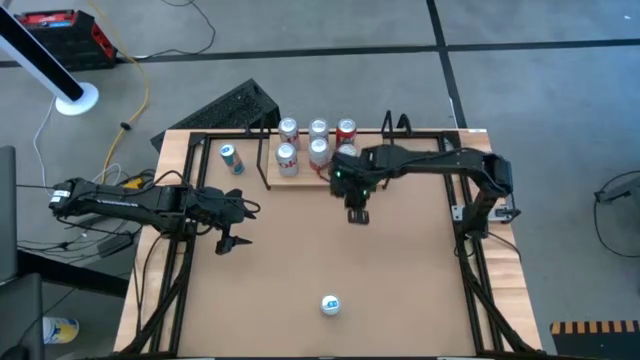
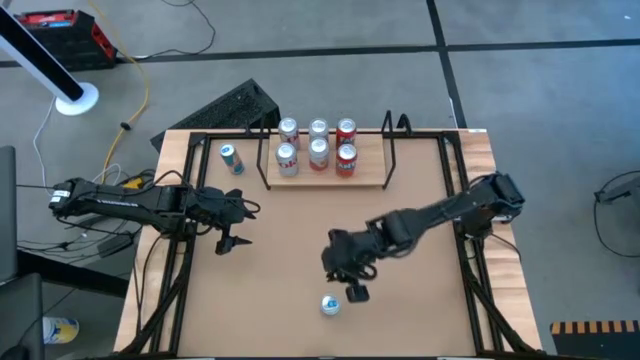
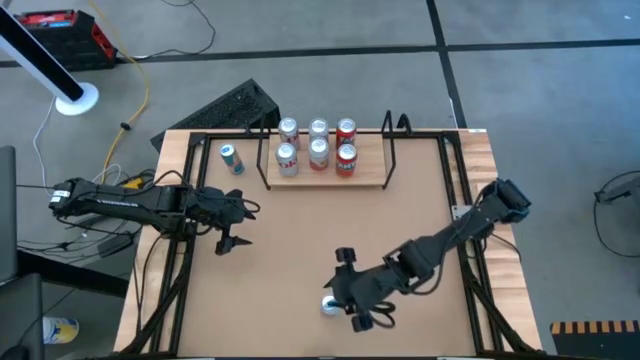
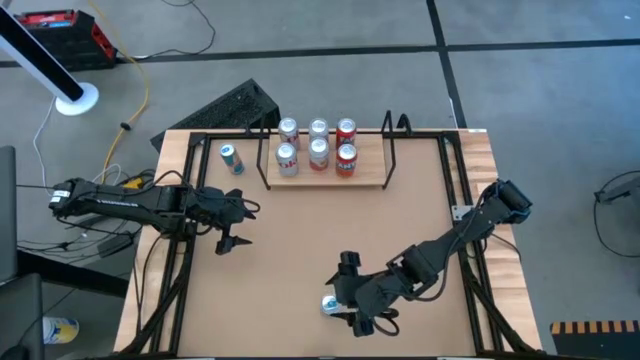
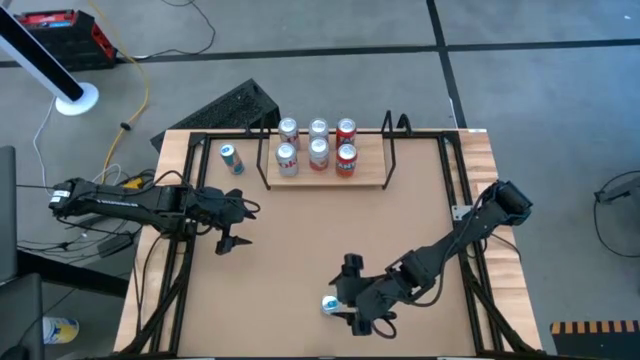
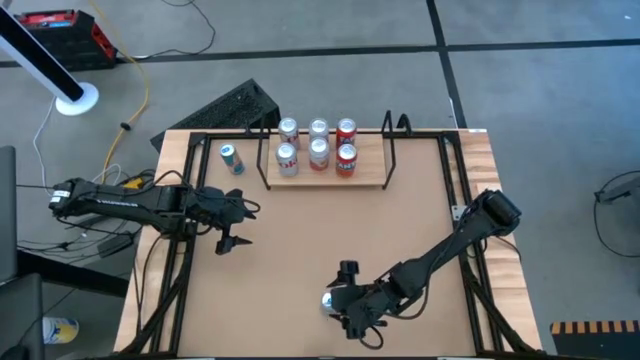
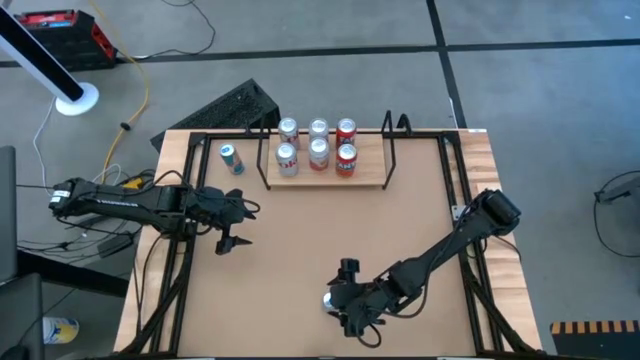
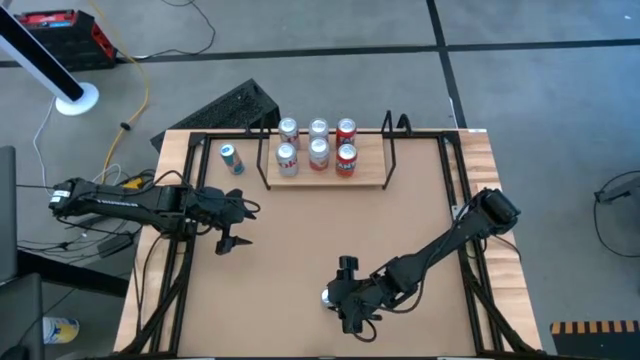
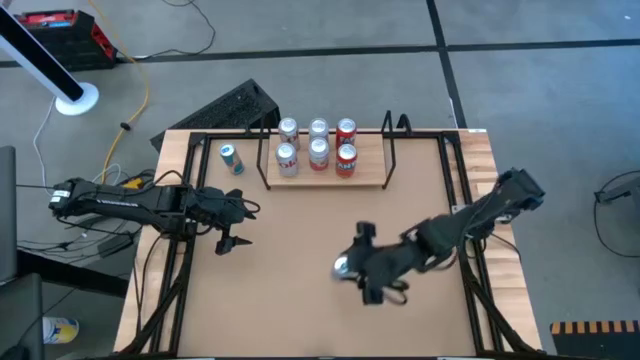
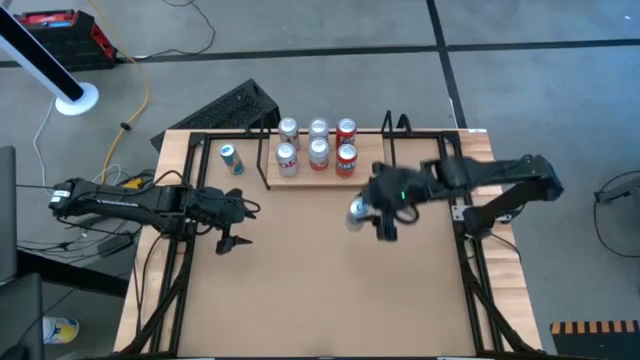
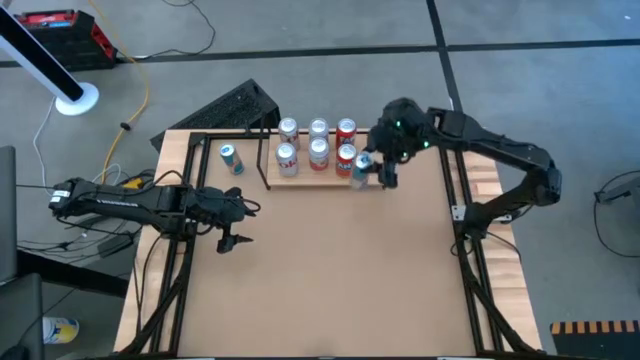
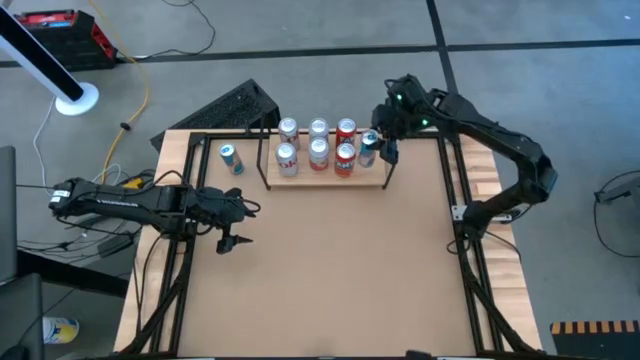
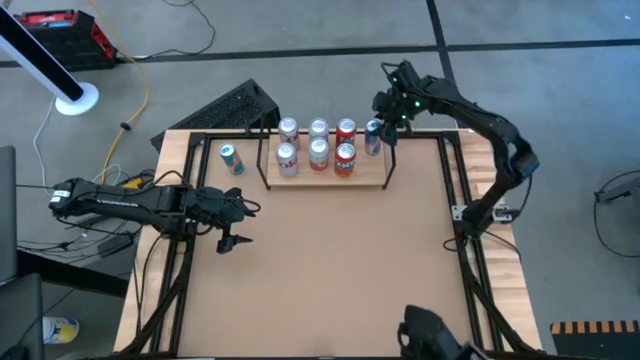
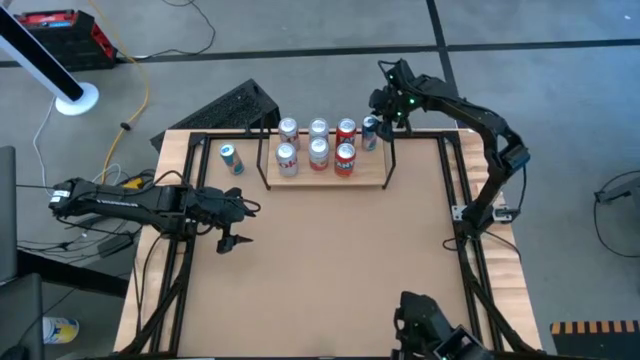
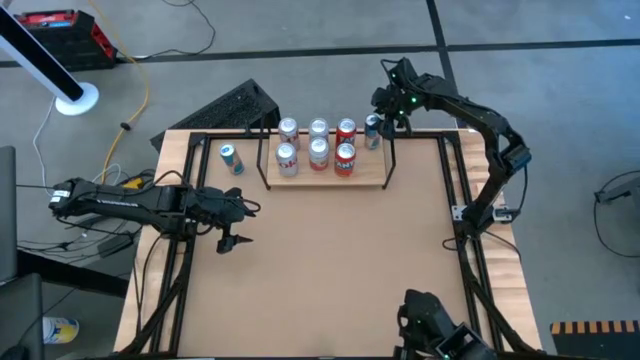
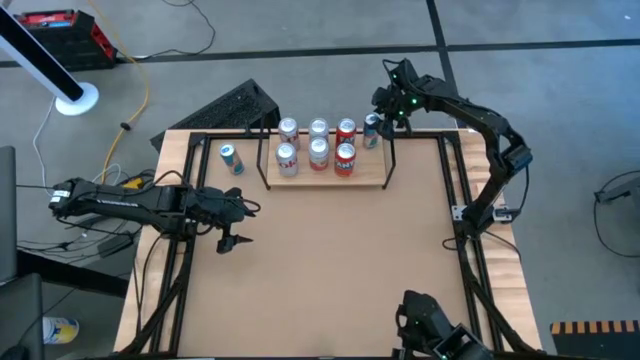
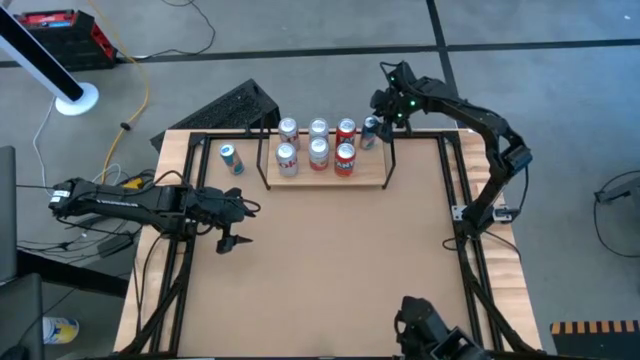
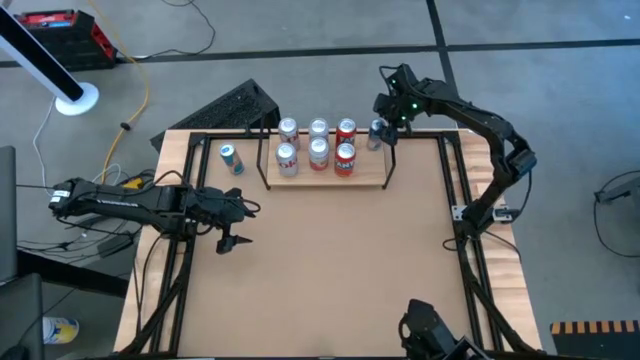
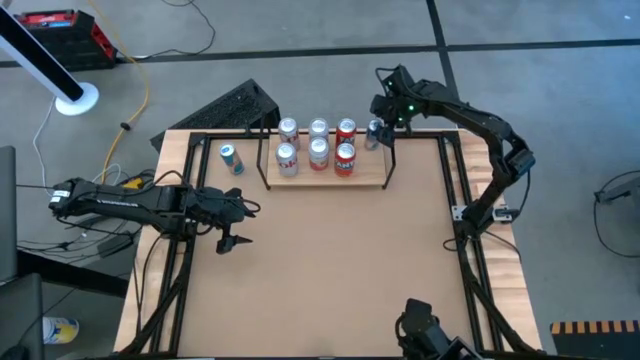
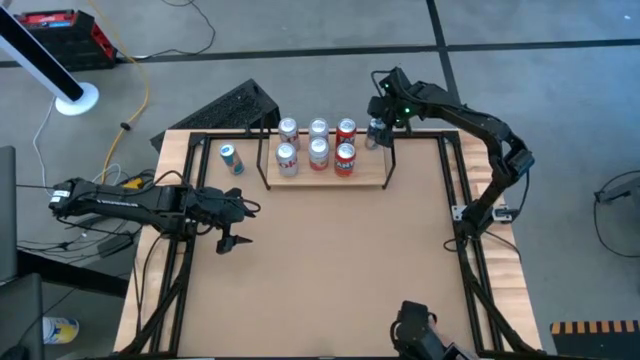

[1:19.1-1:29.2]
Task: Place canned beverage on shelf
Put the bottom blue soda can on the shelf

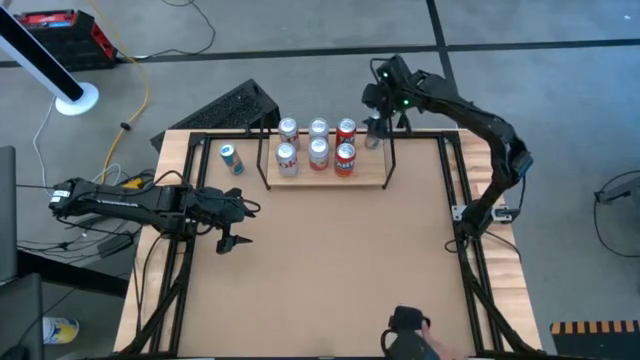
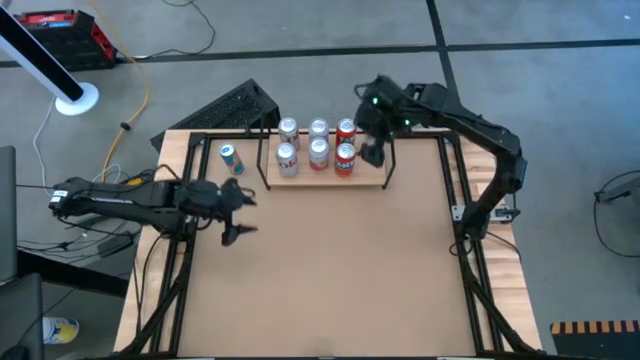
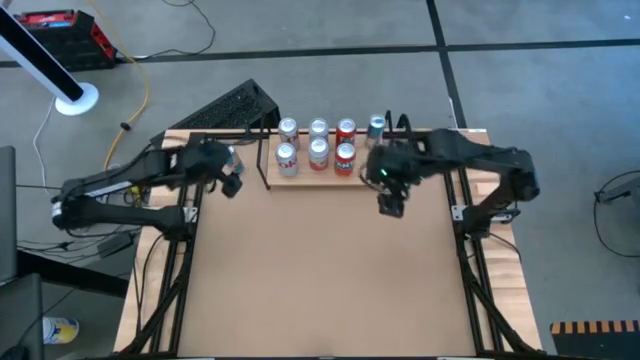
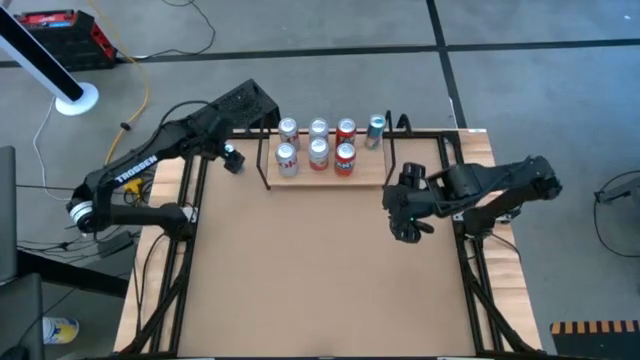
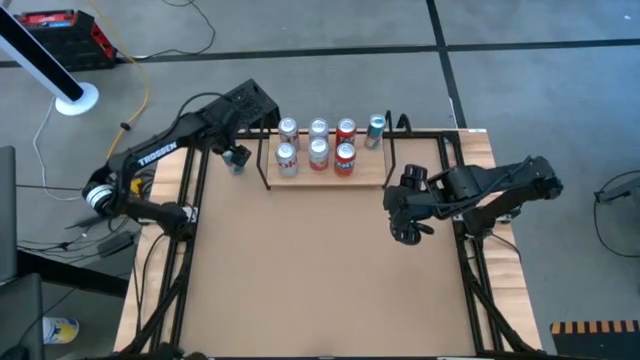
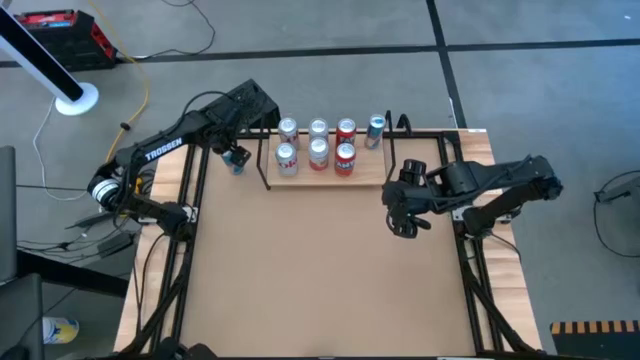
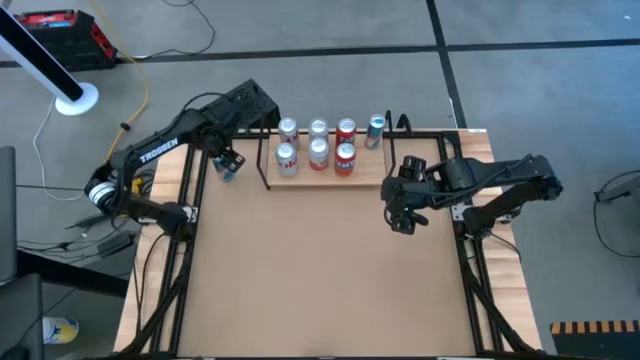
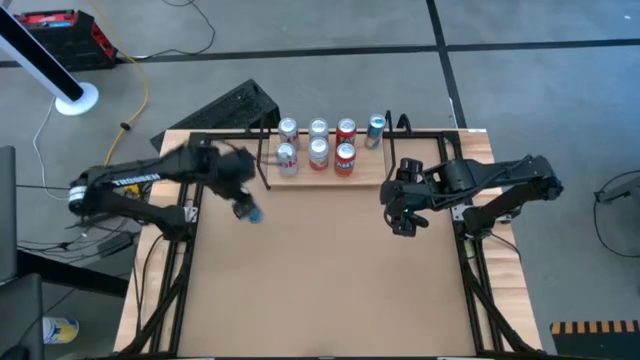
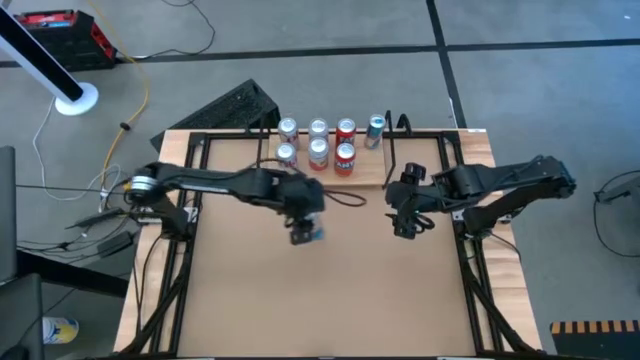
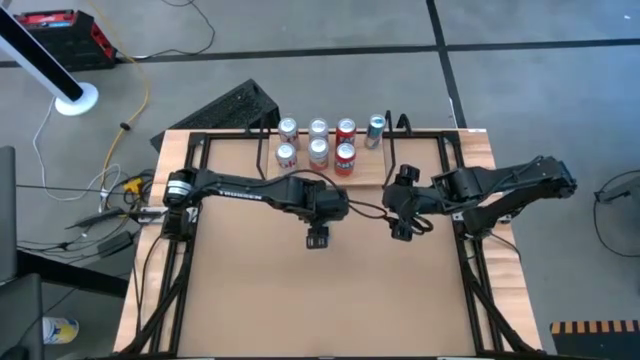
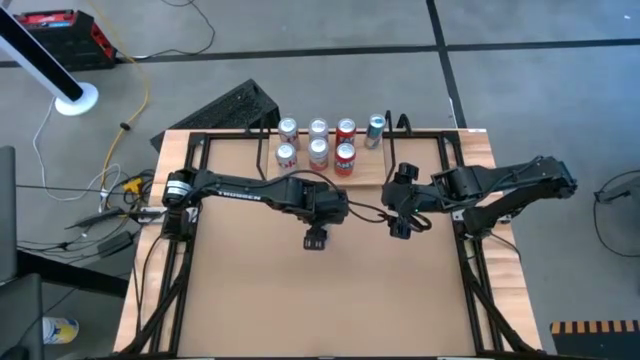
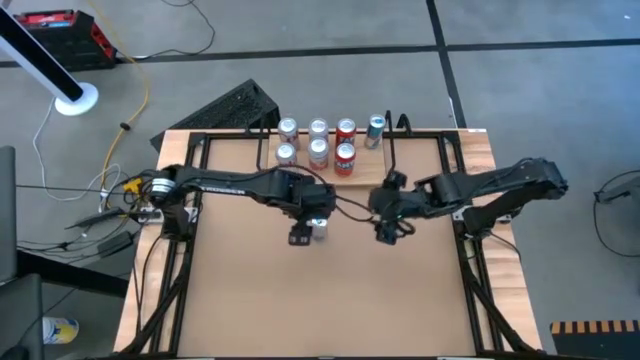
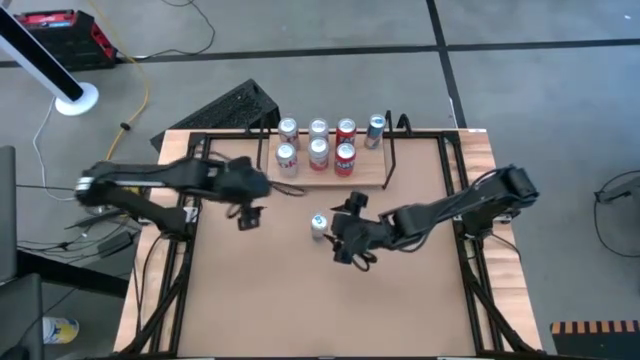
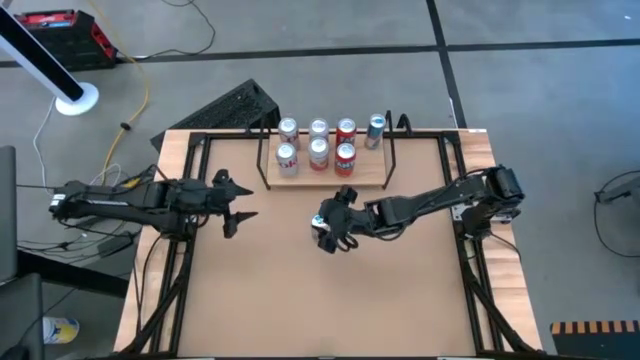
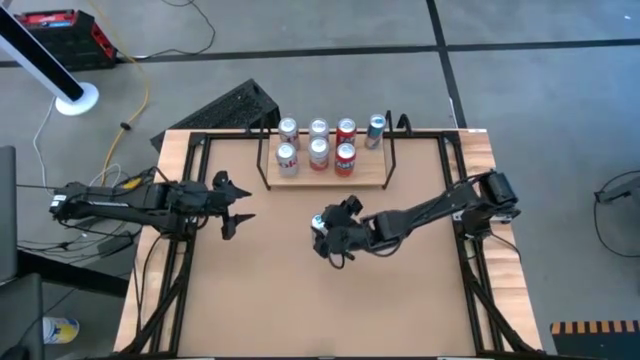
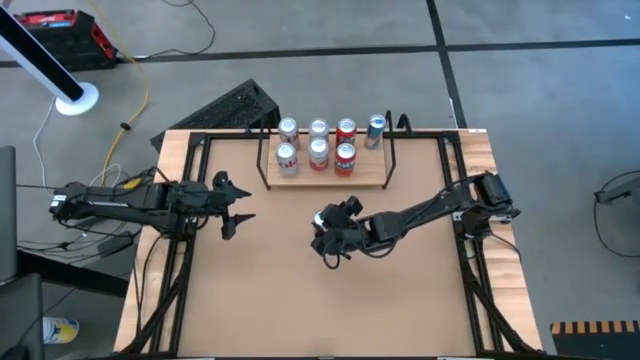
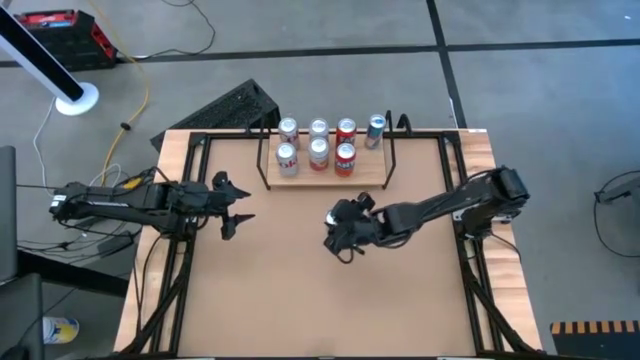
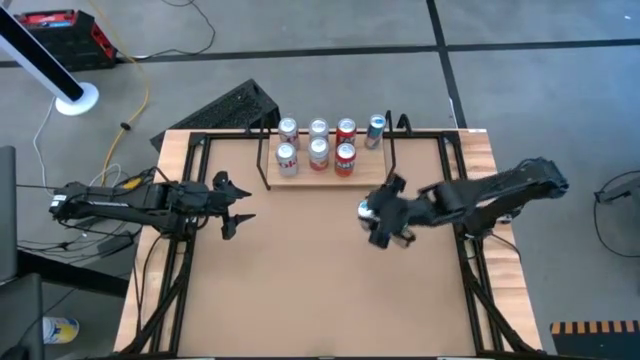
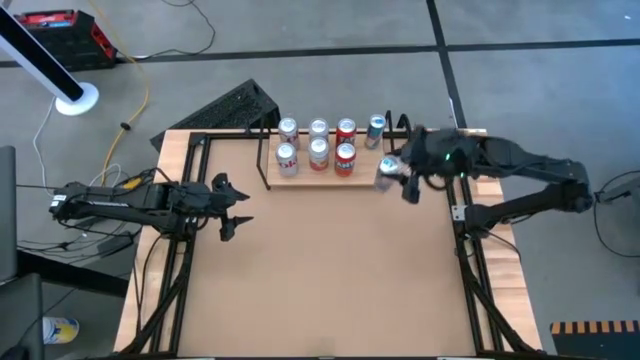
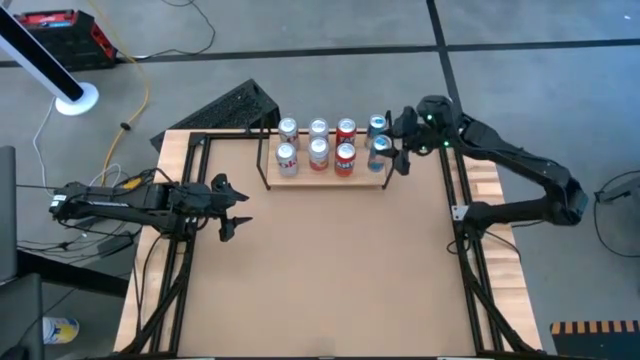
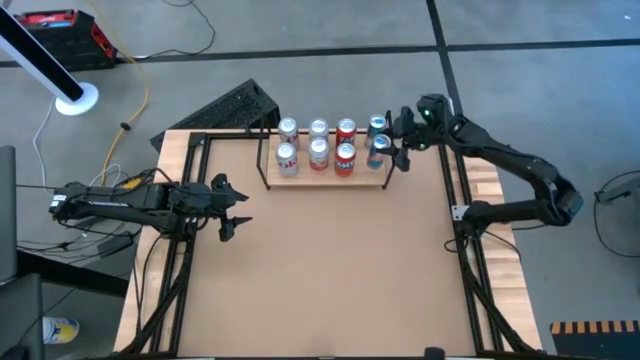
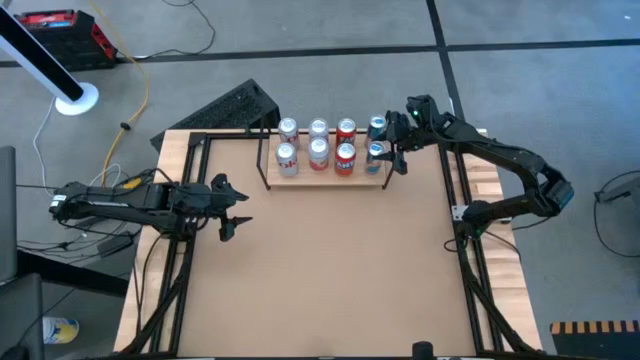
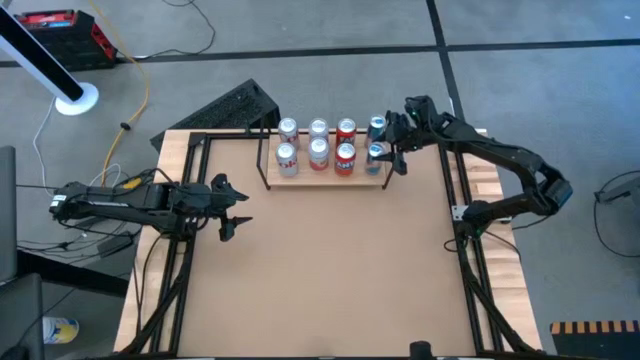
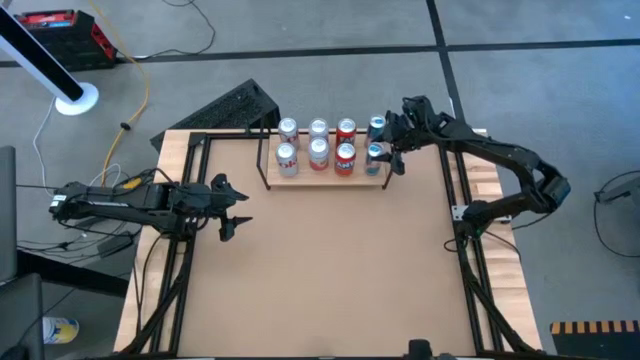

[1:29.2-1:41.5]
Put the blue soda can on the shelf
